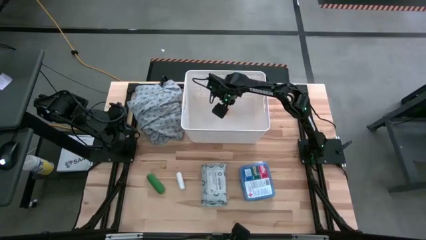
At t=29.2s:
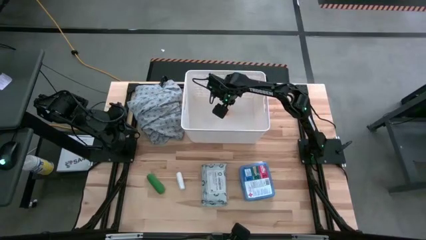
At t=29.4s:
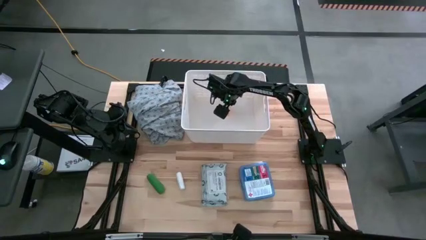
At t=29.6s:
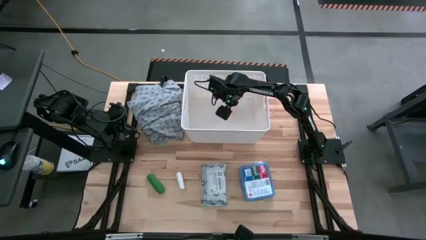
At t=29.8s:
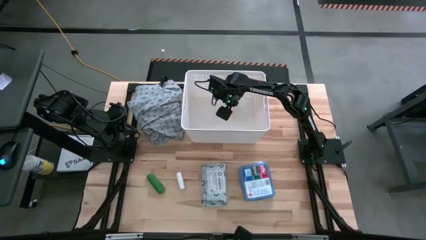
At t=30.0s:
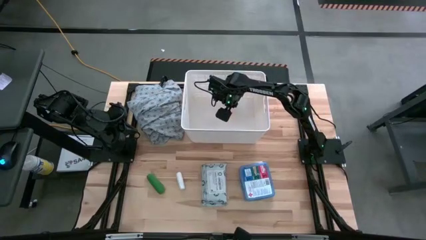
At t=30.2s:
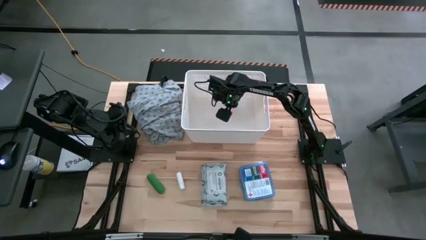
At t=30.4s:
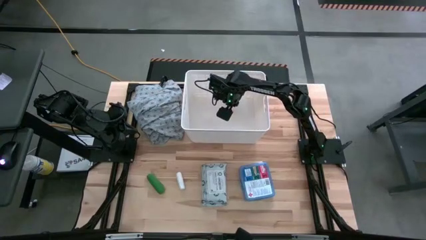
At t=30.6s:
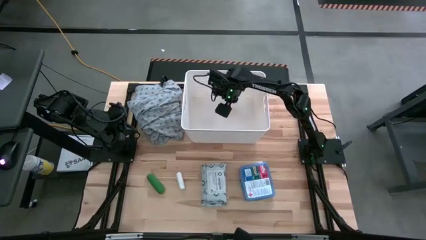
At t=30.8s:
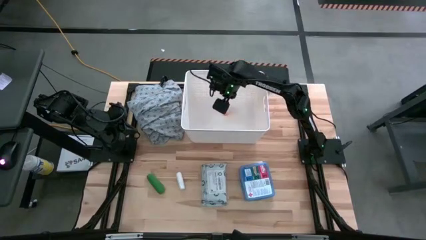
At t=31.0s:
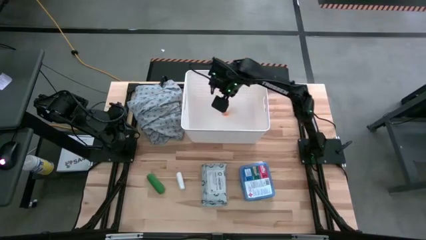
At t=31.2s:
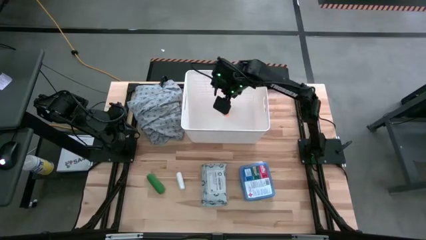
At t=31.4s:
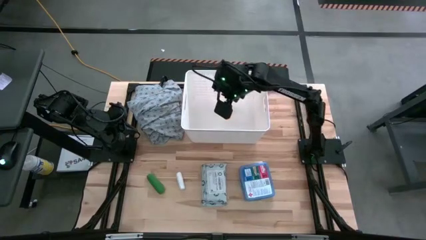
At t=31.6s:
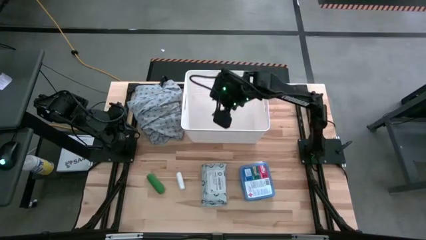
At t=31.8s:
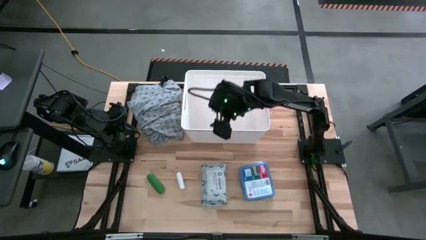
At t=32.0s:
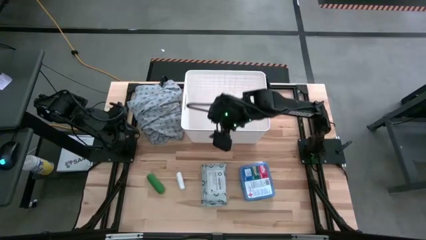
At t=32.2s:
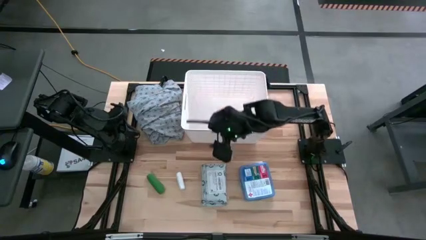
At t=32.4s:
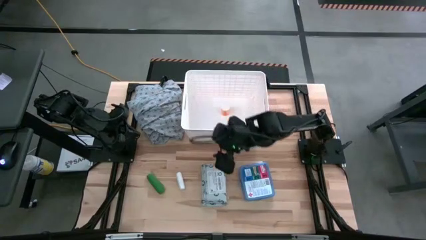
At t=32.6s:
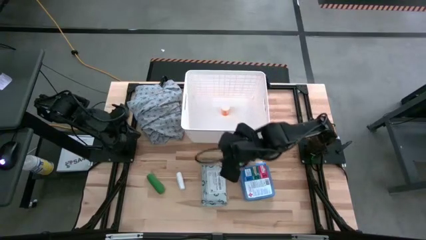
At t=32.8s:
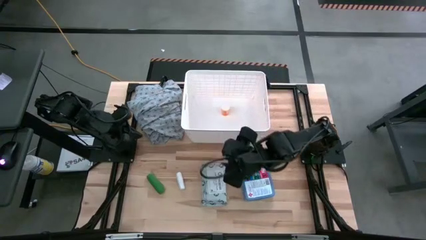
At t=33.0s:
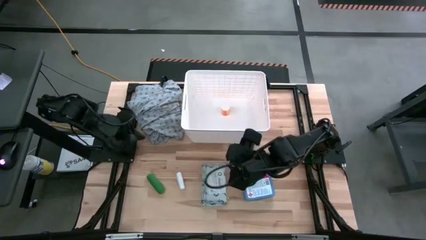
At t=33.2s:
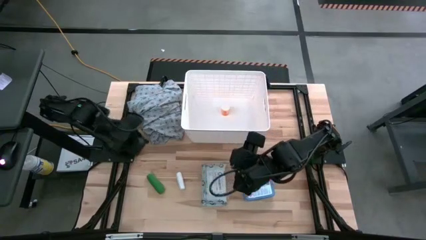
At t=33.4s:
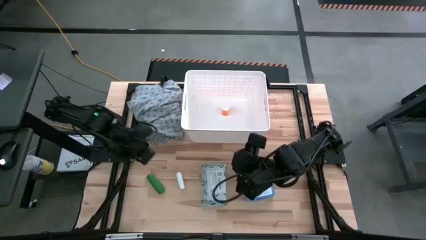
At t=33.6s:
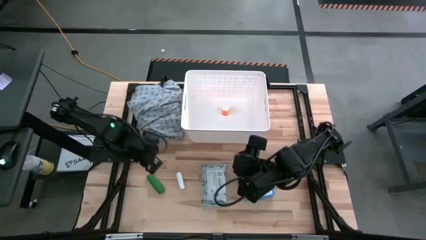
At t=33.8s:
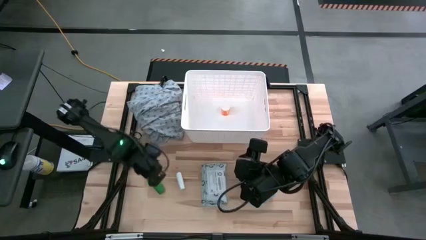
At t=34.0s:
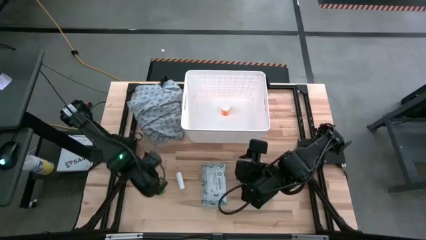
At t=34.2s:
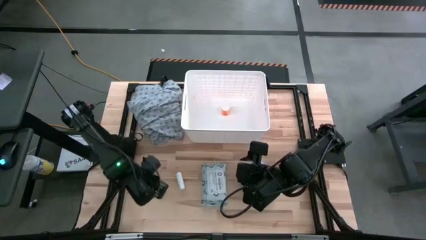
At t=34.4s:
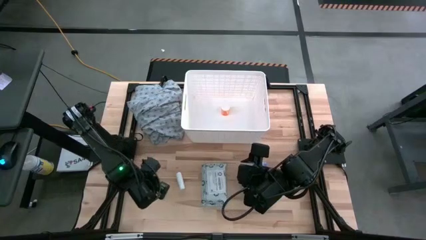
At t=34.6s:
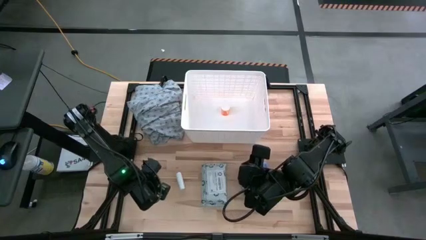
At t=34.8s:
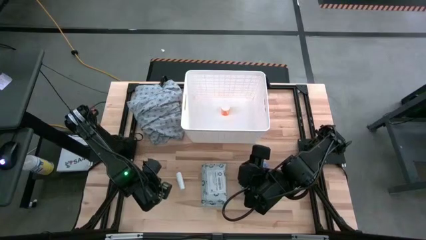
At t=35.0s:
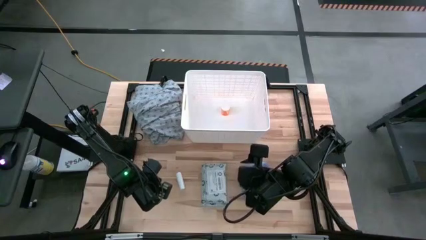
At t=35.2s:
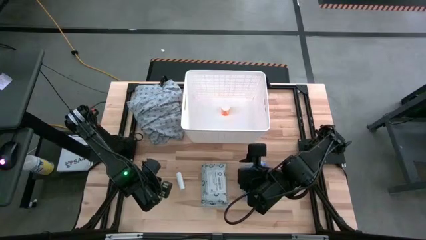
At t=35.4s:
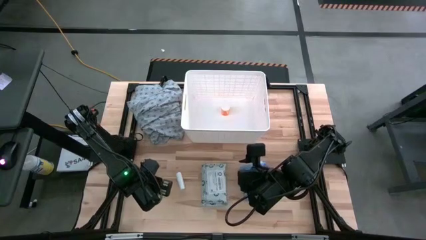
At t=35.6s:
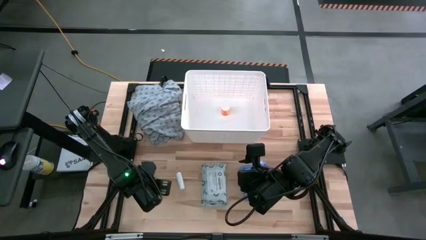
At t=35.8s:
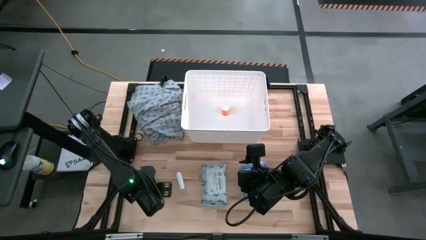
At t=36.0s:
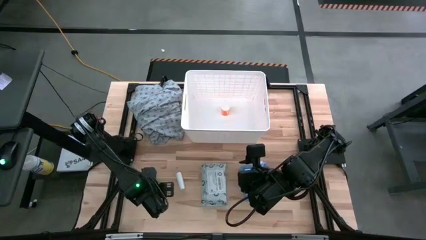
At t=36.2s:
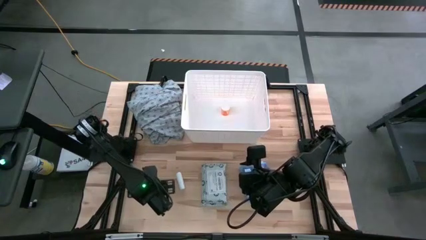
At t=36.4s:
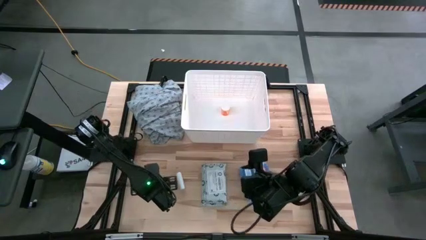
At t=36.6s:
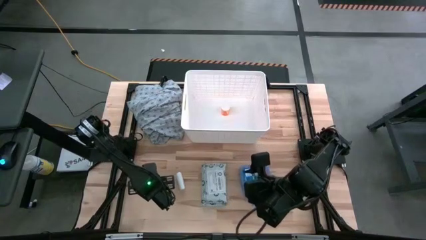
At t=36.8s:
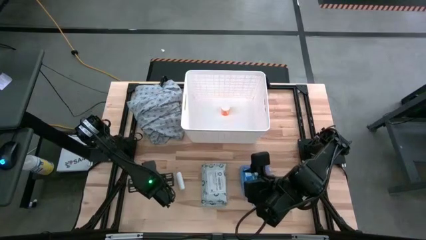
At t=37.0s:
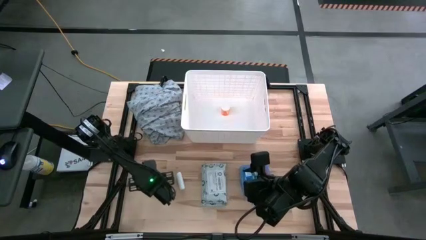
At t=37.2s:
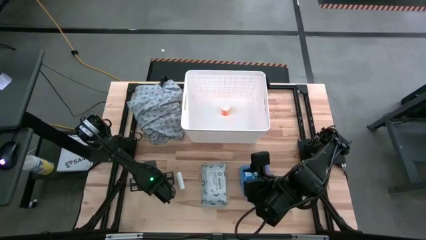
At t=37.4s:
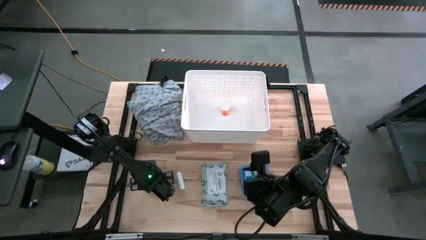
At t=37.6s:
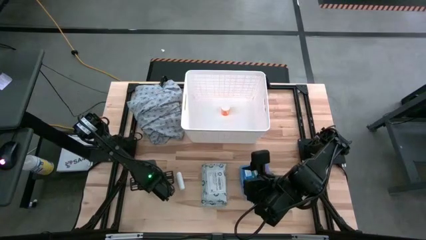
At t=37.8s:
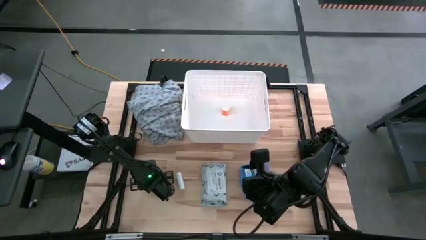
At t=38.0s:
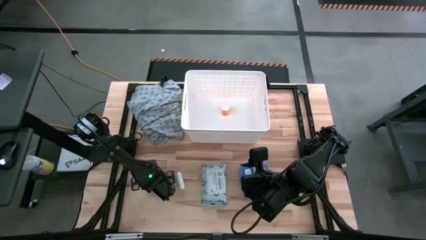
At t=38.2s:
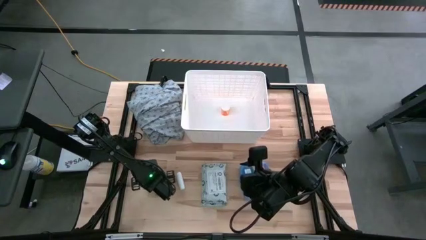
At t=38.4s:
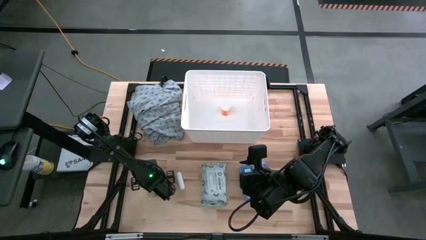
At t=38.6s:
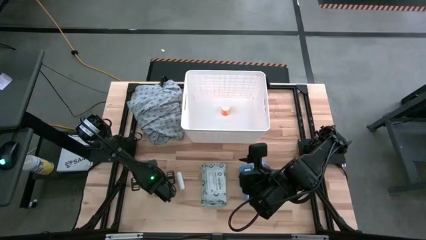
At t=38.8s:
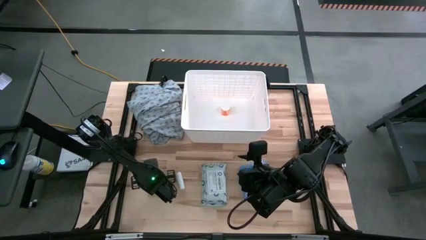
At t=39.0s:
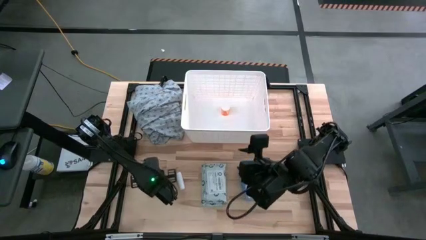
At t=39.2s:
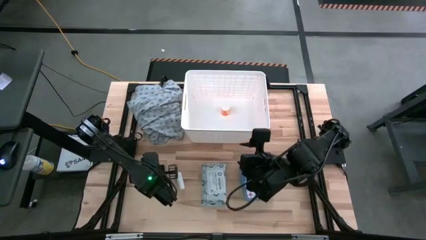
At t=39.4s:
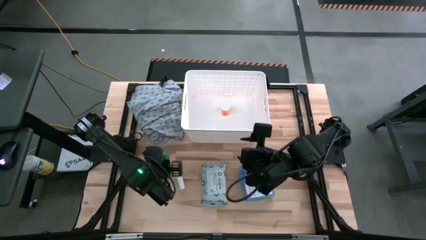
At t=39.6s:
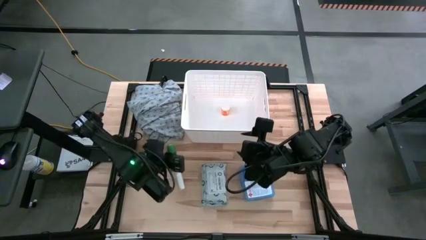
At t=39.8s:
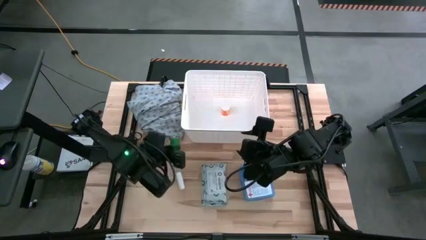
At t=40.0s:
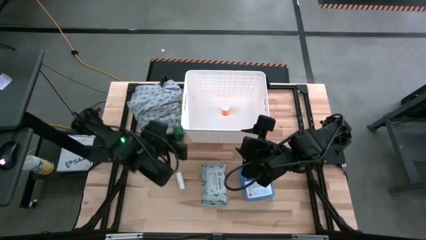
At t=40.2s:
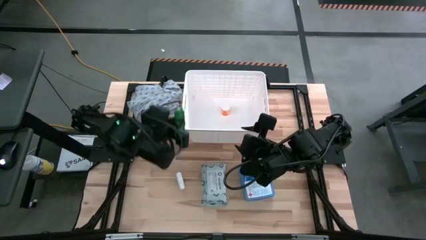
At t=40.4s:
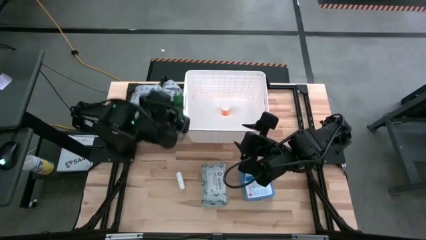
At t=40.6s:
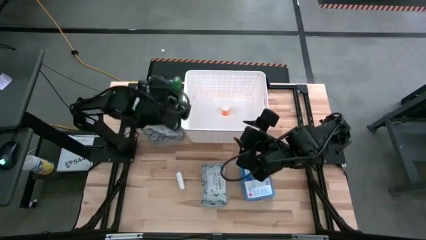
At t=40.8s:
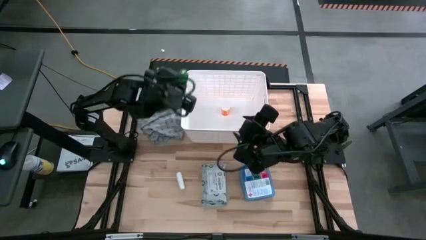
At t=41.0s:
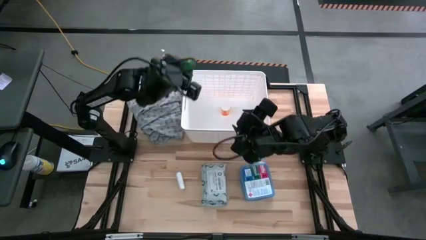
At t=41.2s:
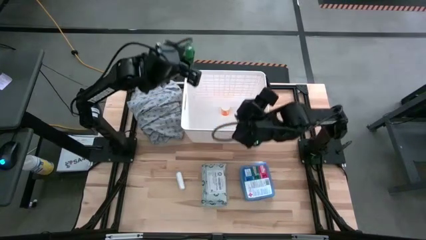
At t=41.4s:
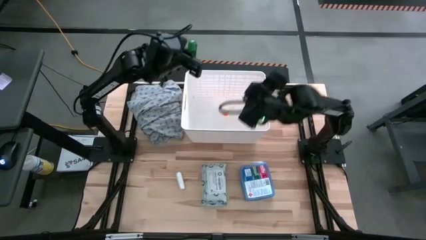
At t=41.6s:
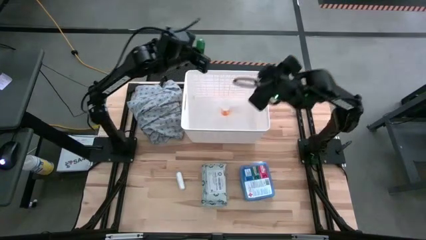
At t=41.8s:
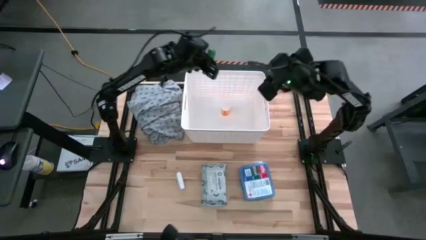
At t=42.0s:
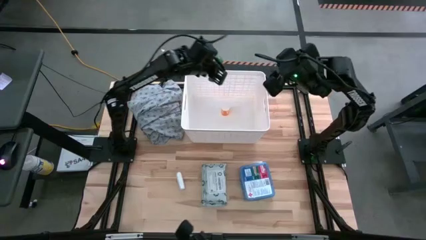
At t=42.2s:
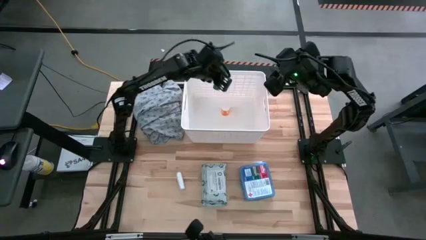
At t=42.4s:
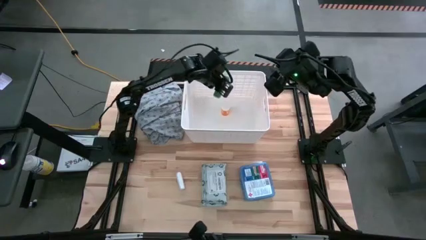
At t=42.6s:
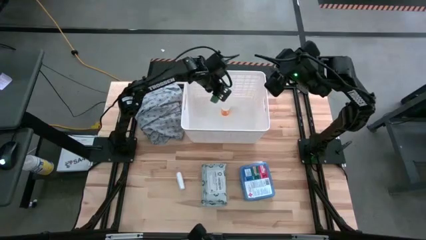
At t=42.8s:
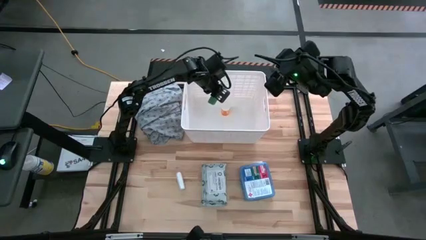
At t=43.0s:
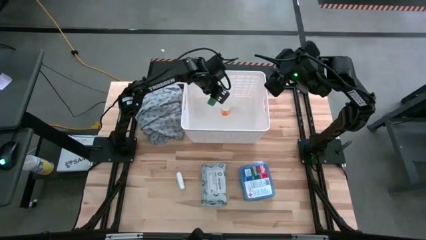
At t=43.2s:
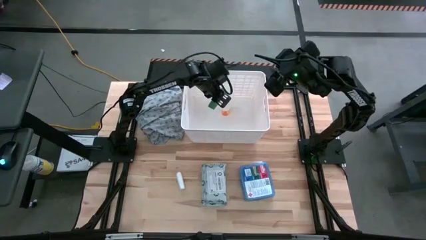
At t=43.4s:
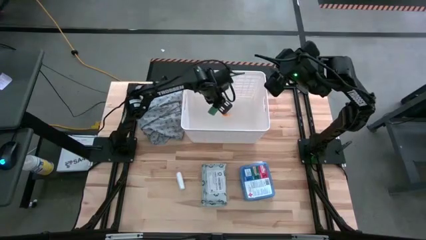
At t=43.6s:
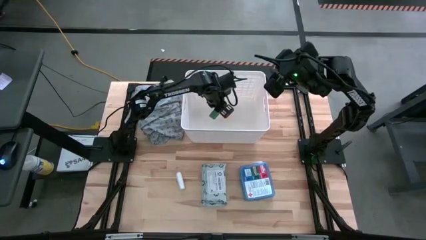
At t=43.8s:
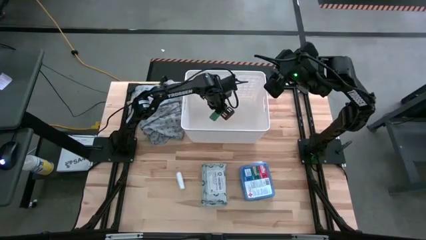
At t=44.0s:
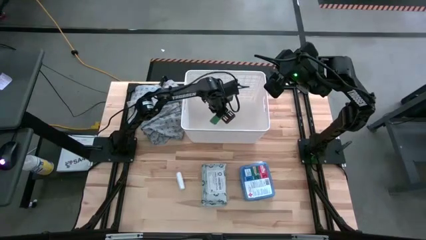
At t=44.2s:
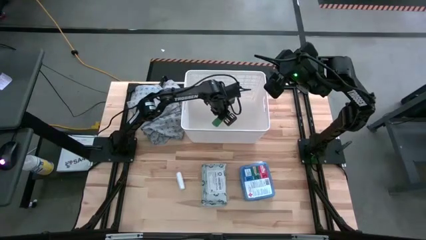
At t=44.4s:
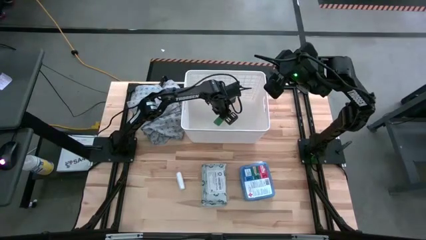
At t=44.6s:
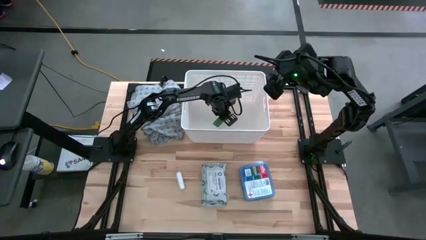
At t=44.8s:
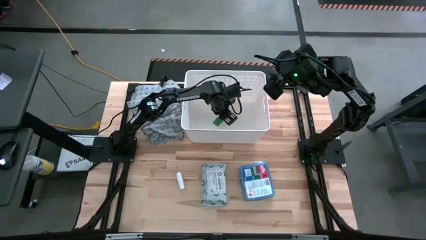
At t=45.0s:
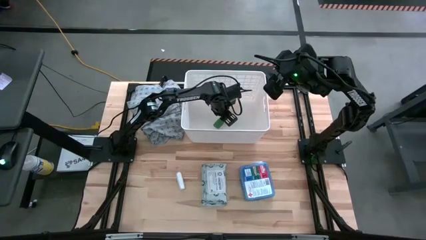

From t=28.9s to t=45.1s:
Task: Pick & place medical supplies in basket/bin
Put the green bandage in the white bin
